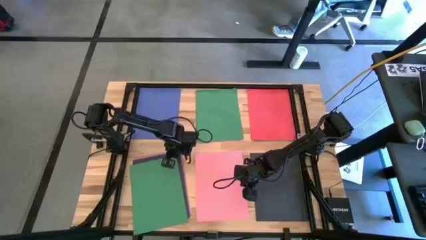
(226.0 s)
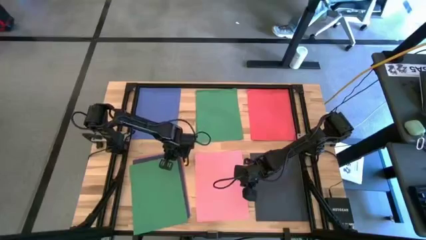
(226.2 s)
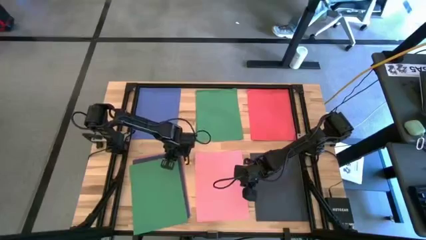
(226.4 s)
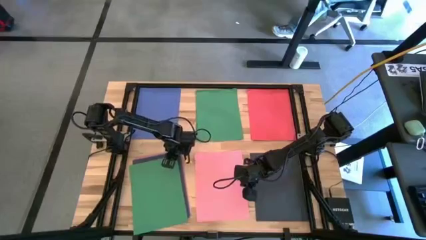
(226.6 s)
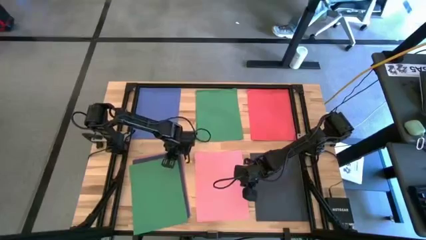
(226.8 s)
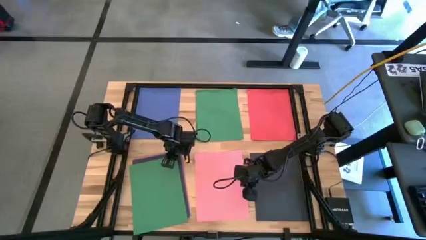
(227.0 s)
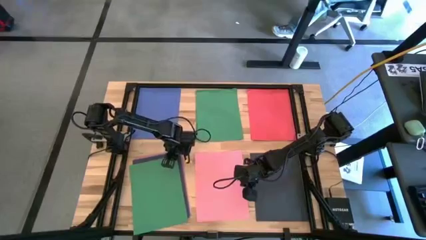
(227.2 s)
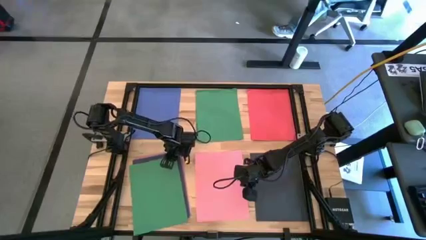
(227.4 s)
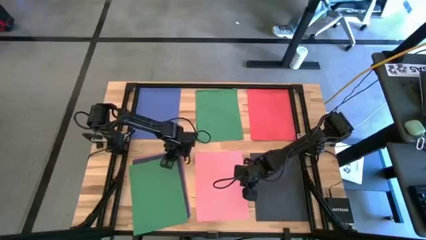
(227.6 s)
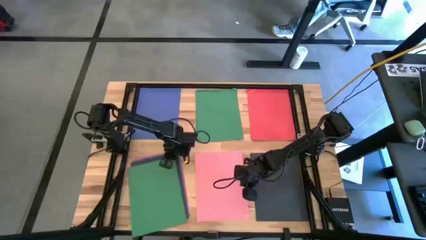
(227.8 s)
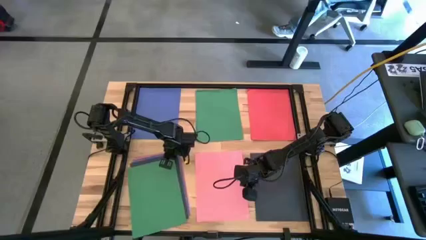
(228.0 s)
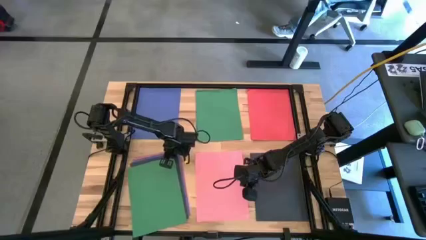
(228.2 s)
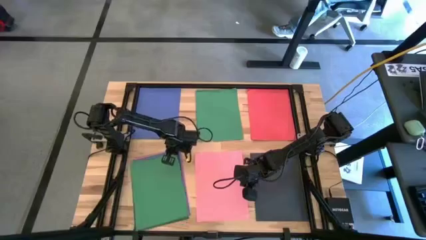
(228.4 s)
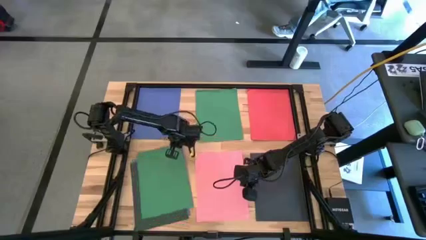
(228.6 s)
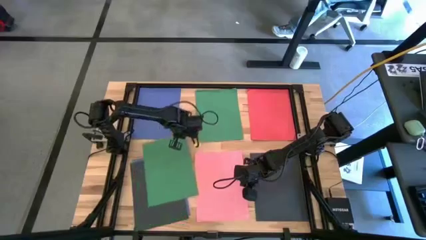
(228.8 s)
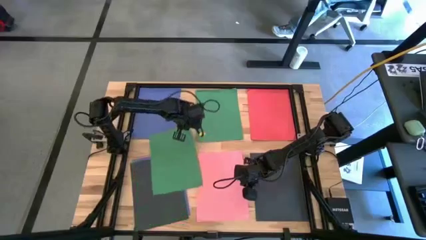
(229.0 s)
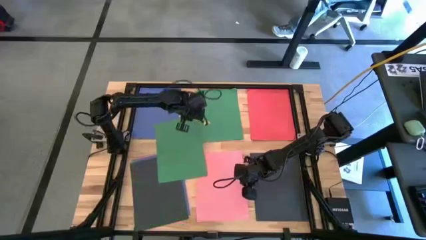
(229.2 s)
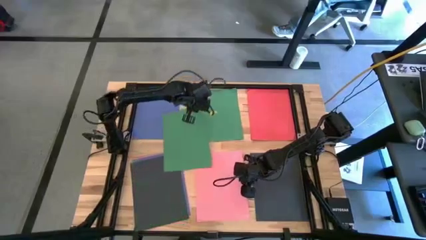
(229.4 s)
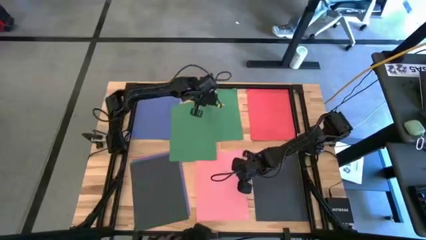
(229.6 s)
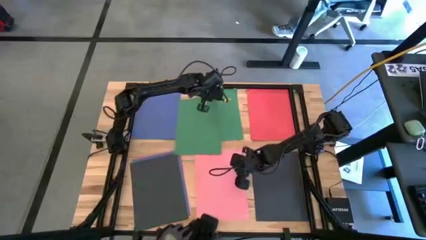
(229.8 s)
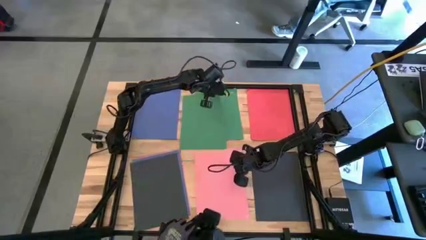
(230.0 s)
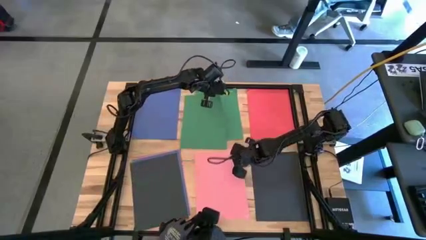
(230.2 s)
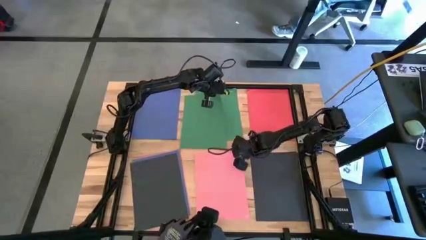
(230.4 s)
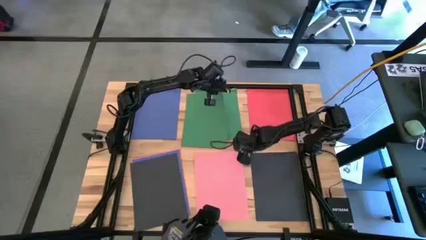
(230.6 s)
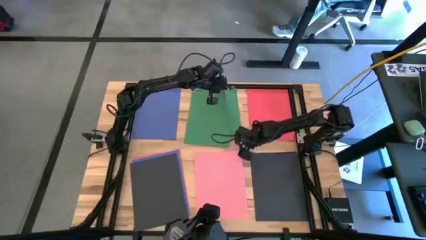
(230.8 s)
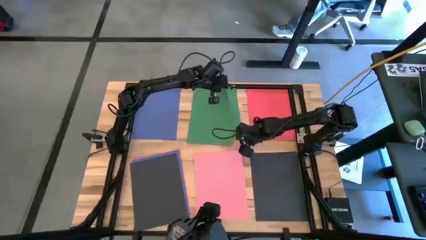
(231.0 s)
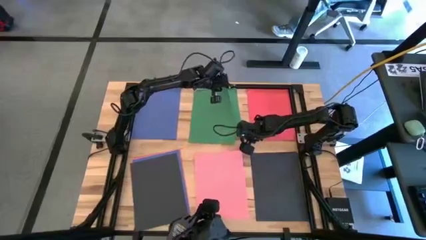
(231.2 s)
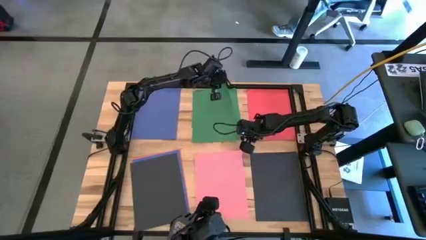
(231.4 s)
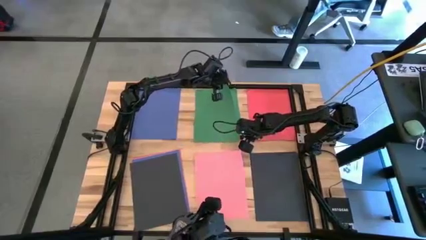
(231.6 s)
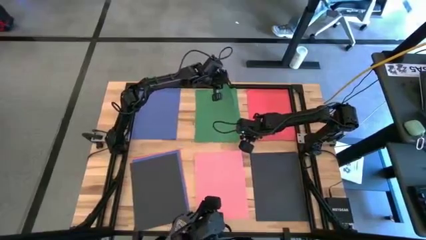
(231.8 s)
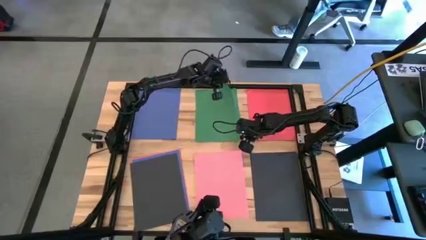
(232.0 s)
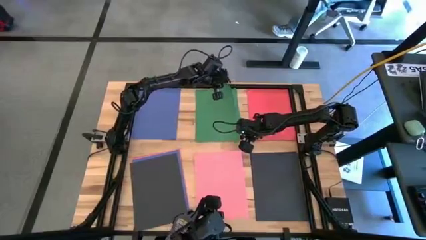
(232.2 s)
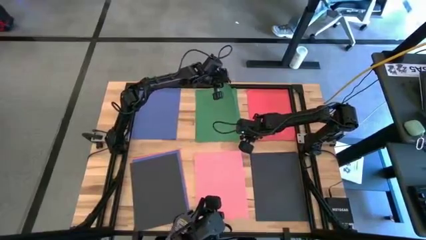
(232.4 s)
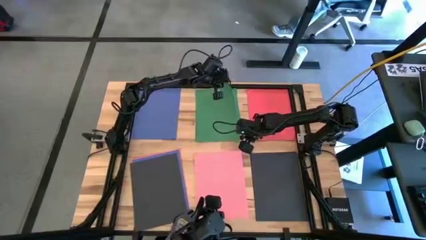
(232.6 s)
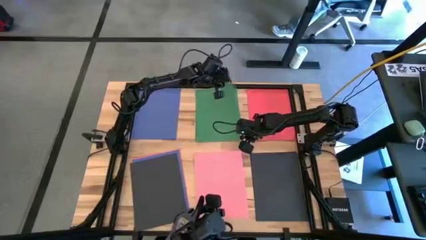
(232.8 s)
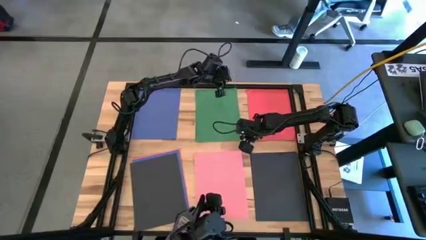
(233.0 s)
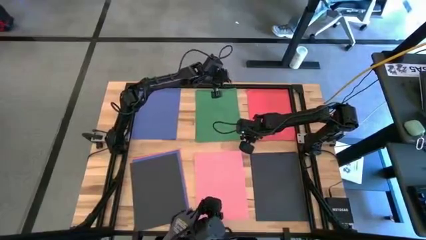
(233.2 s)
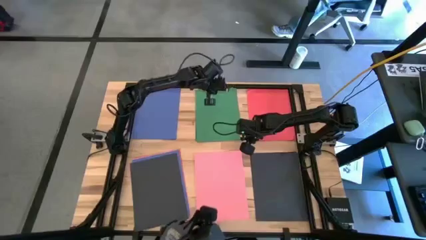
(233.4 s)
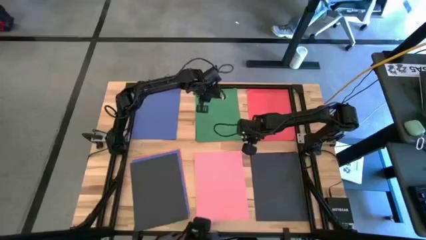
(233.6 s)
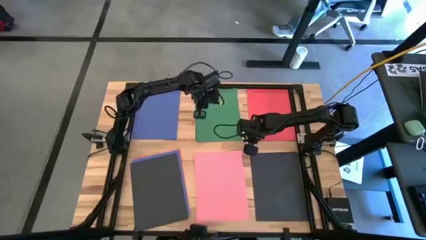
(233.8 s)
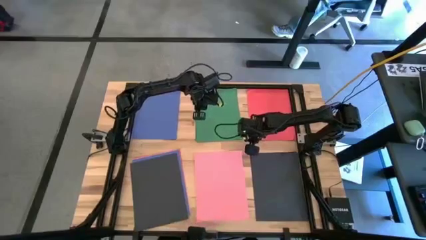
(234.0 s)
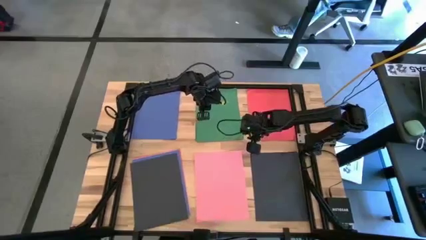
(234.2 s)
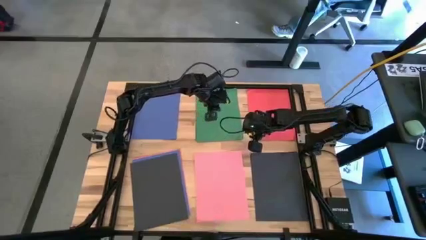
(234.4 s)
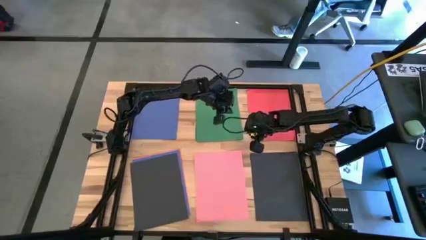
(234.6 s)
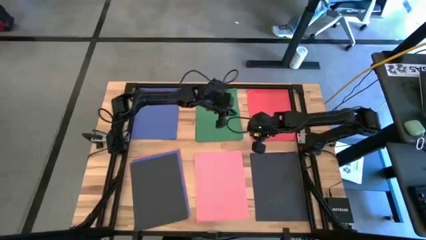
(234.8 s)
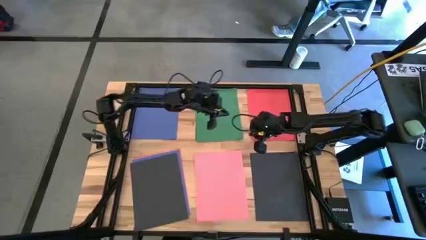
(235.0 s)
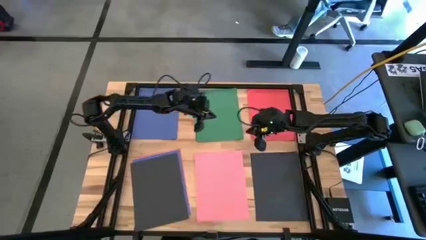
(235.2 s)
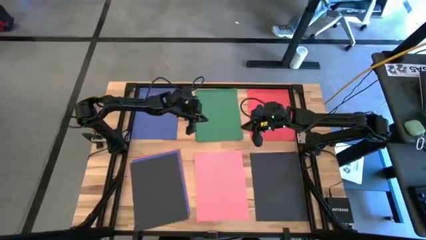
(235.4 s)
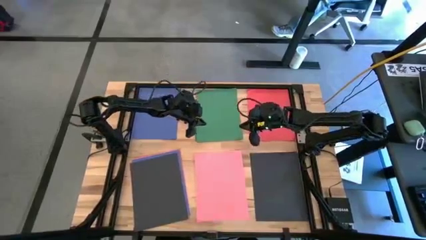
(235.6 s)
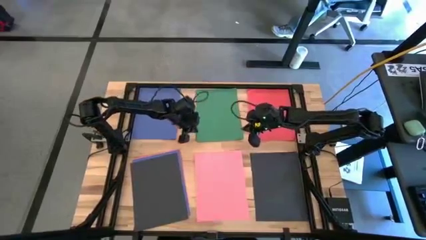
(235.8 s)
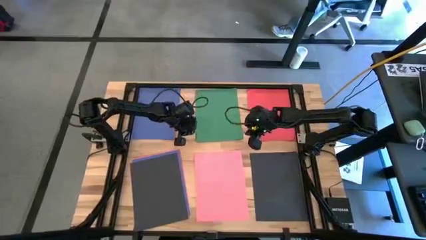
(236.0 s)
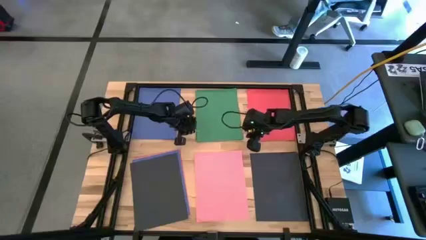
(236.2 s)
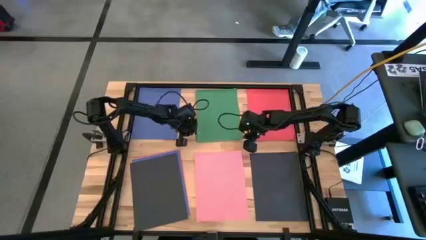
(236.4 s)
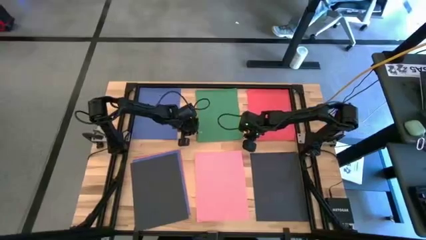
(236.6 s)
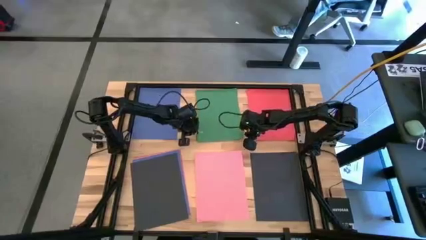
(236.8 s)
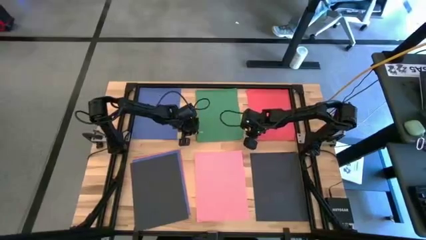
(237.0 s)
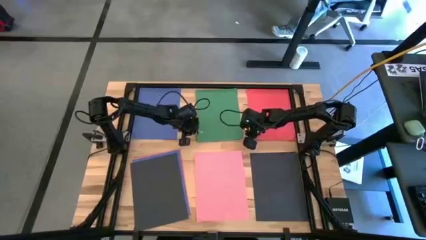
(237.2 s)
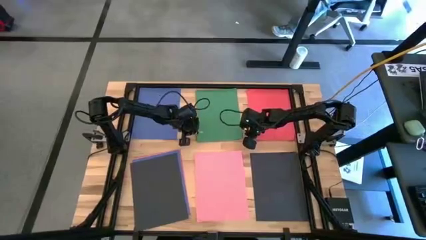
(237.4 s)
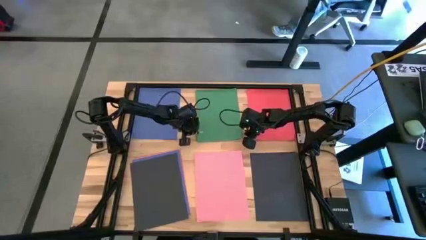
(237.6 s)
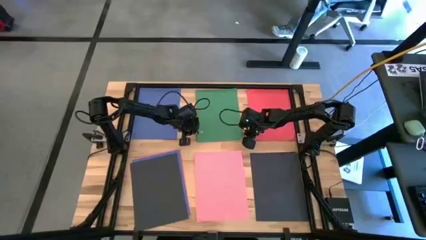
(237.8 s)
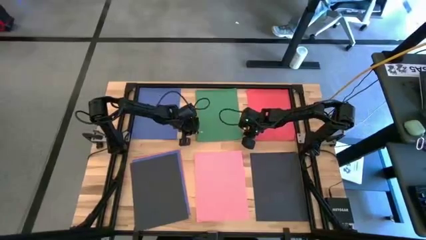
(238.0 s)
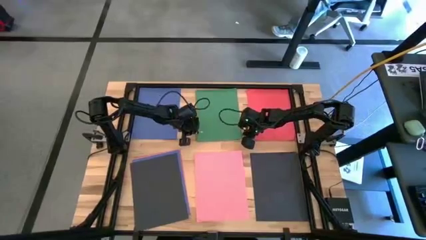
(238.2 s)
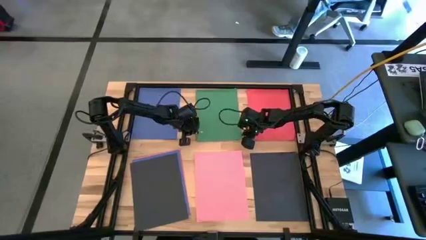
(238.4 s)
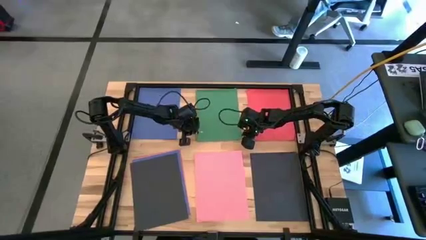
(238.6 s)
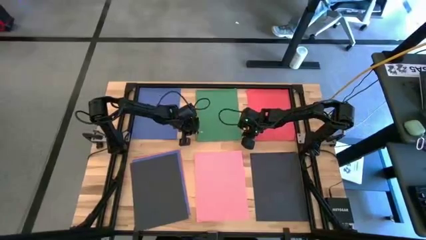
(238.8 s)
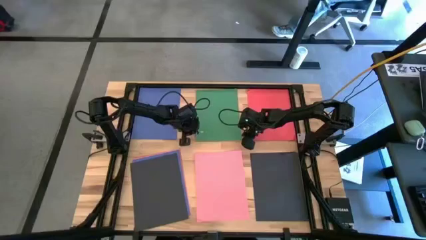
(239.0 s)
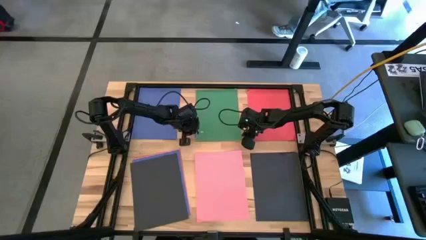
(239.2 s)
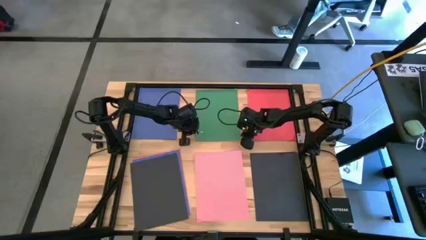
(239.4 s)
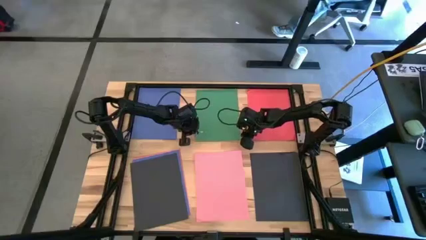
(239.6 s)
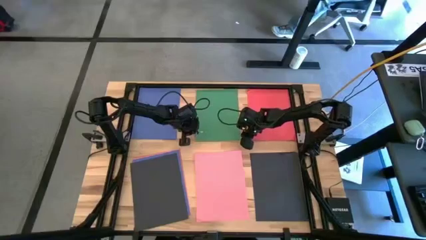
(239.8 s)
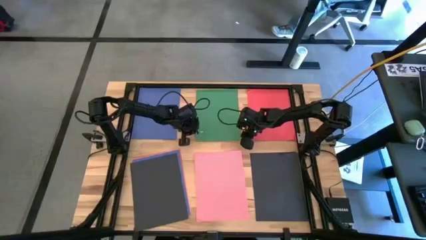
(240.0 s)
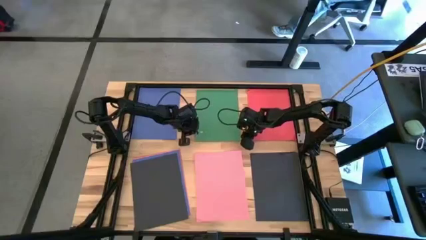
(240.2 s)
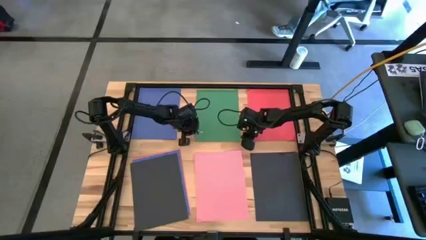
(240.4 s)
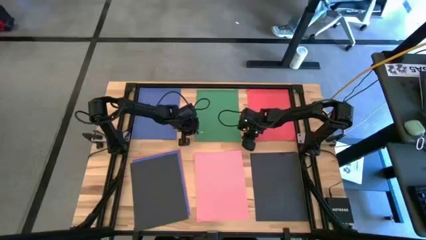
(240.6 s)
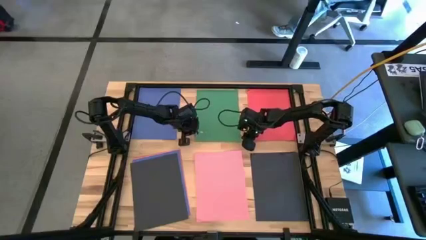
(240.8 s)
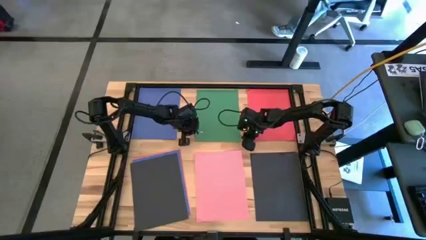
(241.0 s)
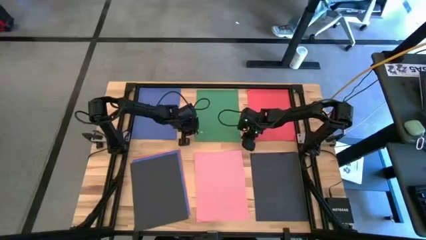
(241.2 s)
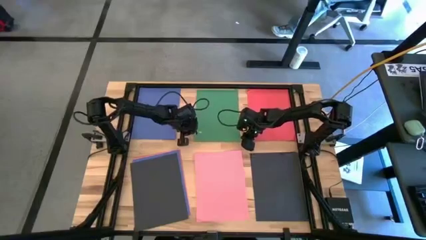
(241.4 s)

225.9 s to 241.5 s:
Task: Organize paper
Stack the green paper on top of the other green paper
